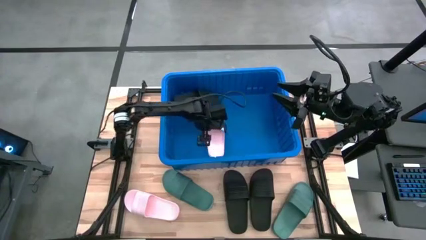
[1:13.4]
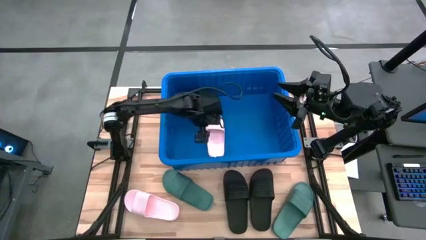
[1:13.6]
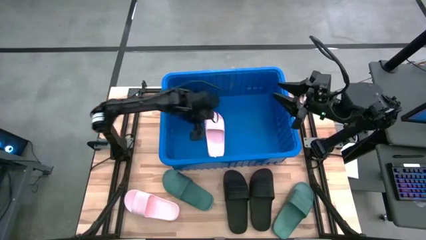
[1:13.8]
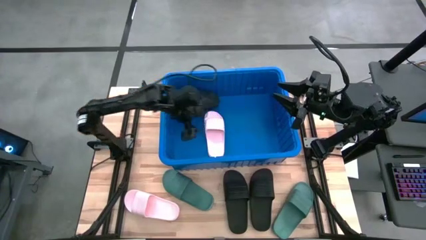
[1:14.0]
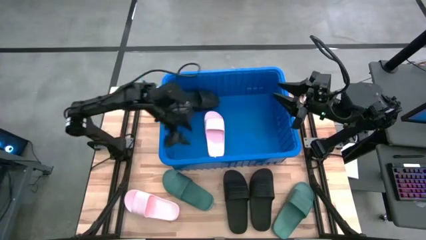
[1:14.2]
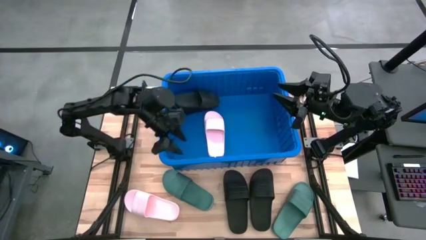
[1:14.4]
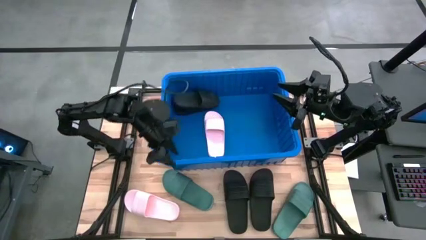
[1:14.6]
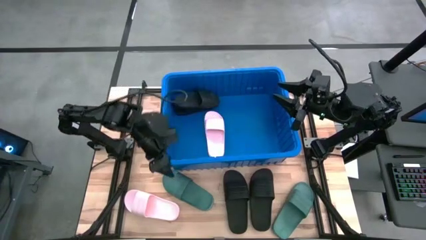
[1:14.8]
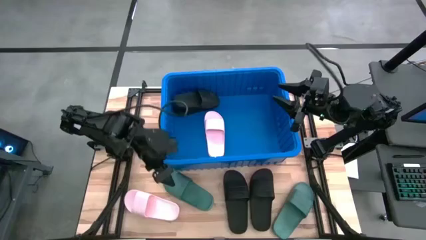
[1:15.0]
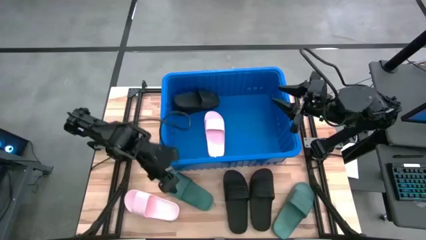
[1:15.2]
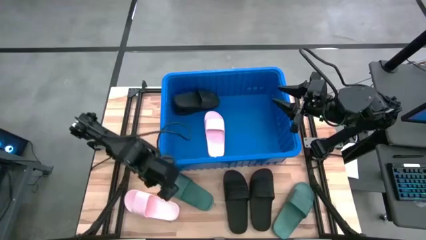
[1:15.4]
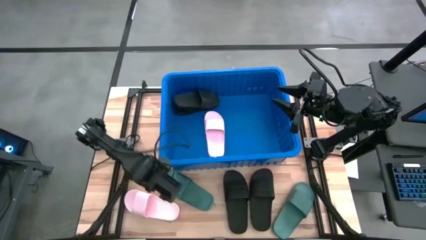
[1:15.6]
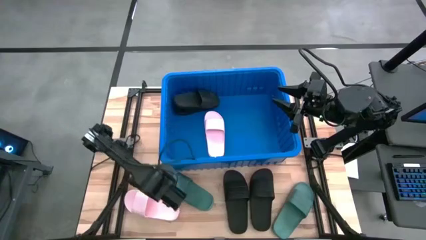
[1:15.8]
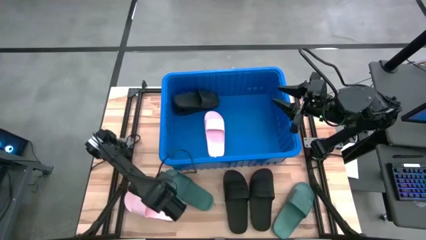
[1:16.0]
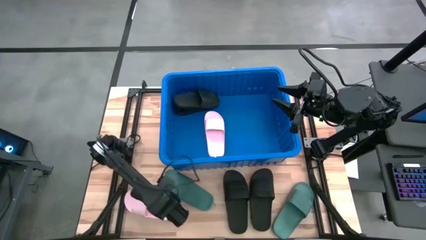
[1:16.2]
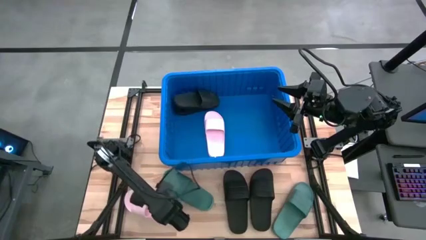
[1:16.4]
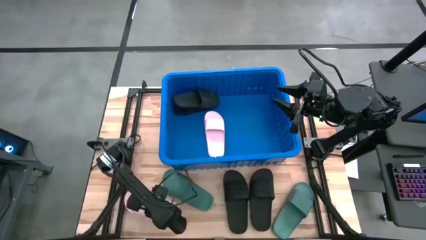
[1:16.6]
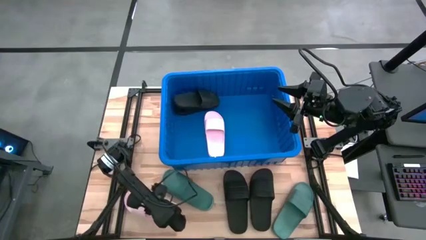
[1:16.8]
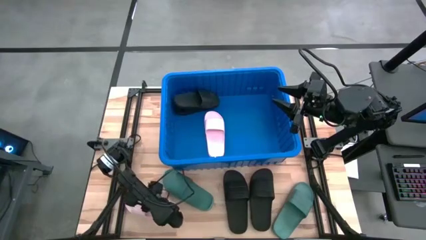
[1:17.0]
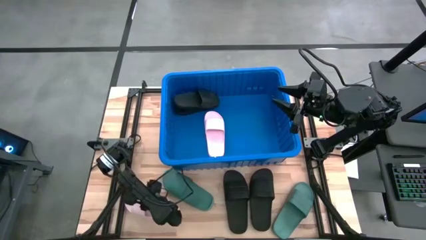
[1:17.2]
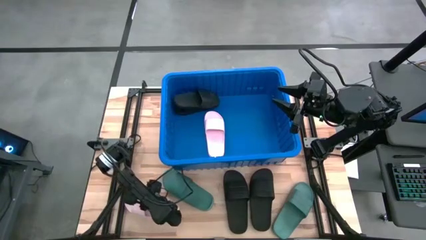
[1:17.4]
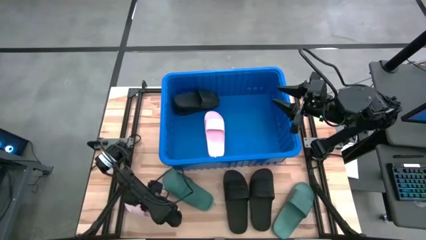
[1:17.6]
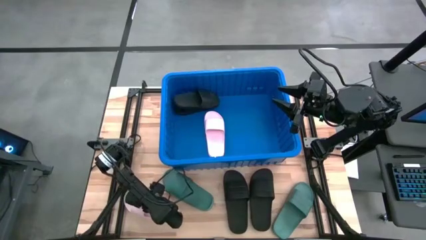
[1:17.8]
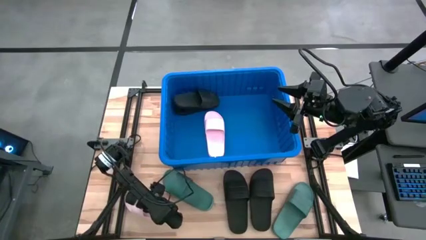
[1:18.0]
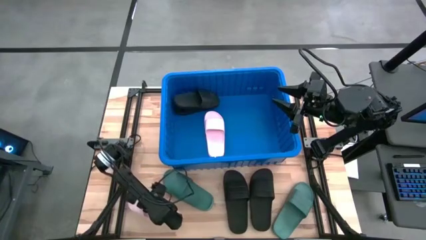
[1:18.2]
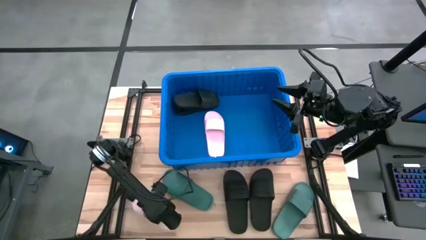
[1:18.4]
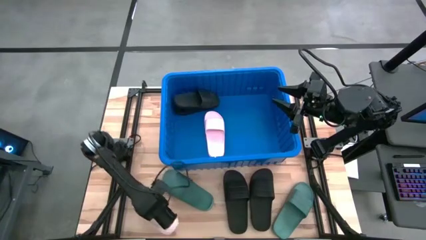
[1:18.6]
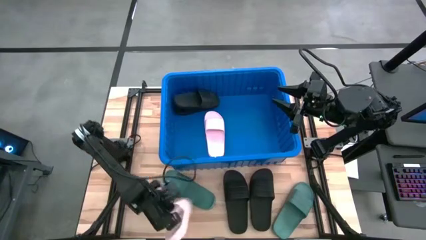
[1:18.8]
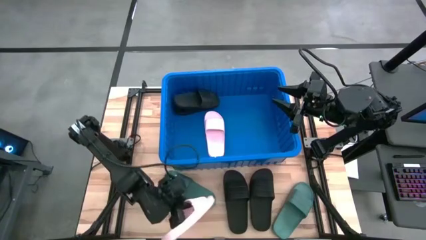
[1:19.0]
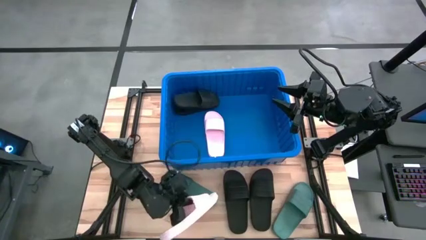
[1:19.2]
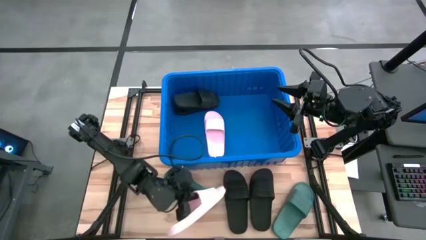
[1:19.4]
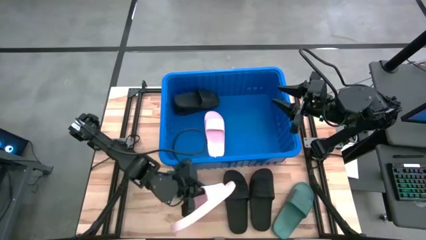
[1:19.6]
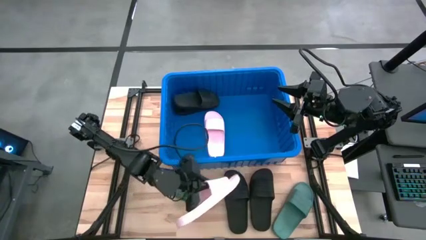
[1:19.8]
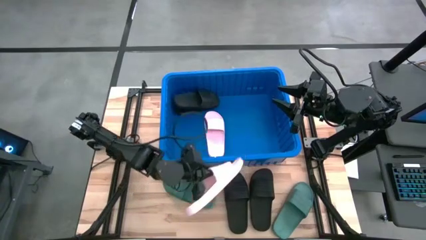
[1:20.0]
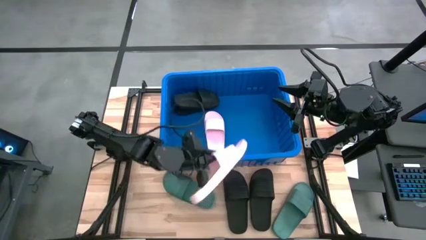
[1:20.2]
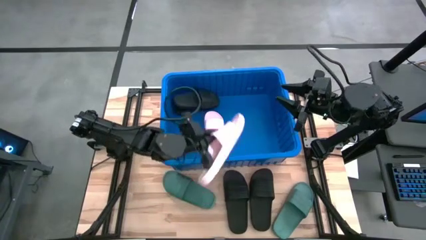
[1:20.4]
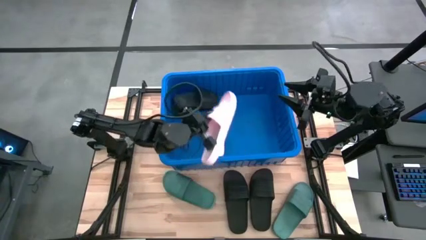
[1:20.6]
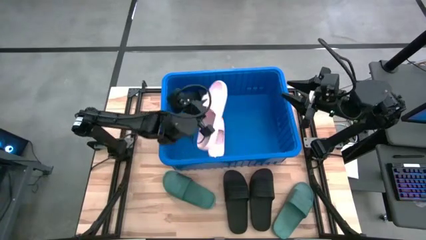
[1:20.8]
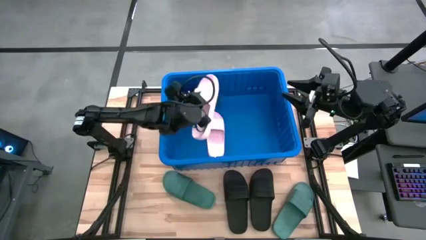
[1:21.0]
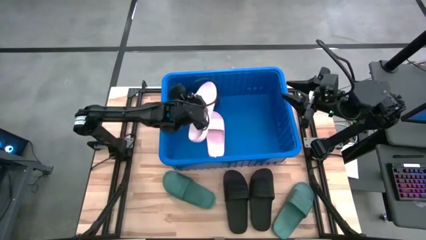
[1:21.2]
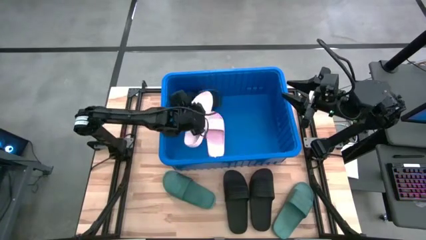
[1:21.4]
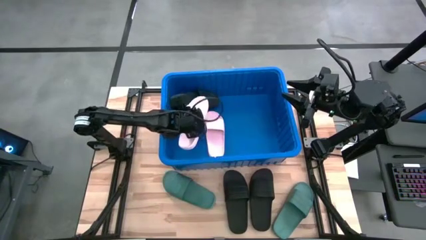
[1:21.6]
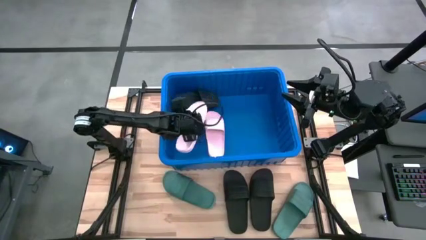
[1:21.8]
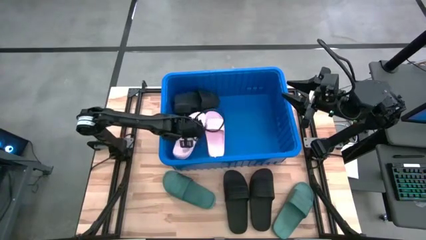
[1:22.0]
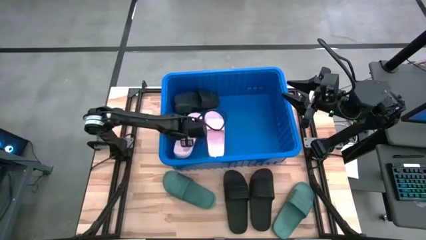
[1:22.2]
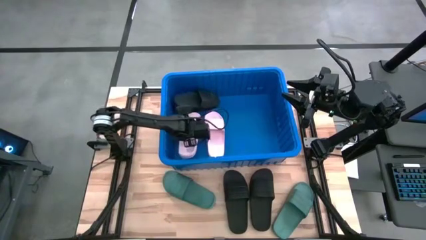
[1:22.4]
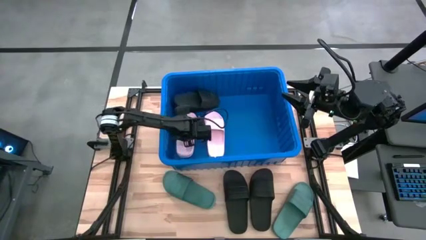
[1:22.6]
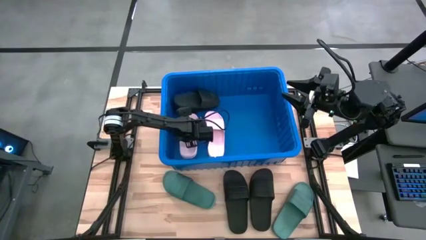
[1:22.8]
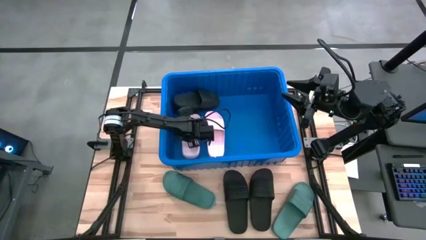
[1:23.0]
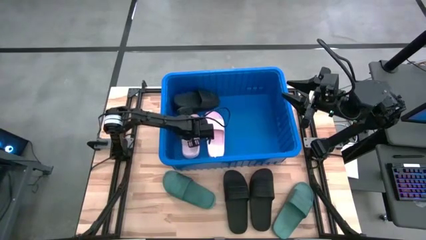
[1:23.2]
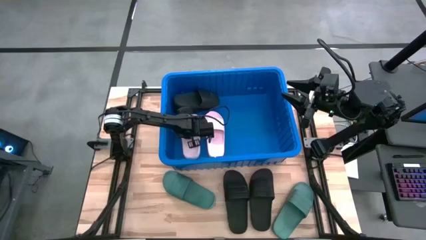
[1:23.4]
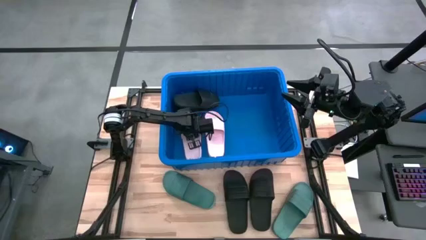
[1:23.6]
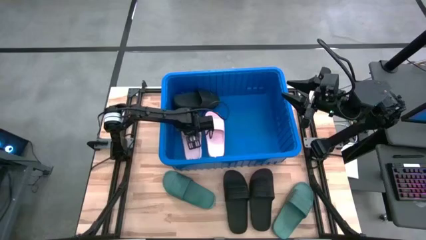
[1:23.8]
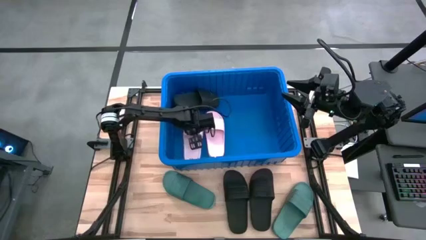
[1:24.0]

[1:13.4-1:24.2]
Task: Pick and place slides into bin
Put the pink slide into the blue container

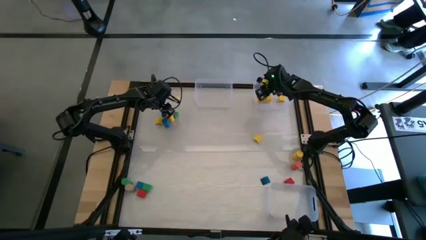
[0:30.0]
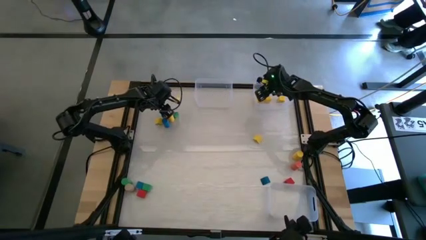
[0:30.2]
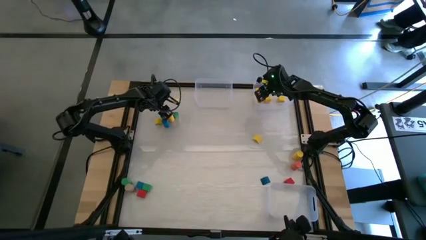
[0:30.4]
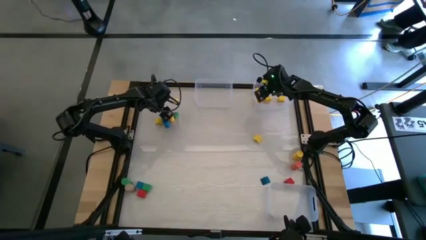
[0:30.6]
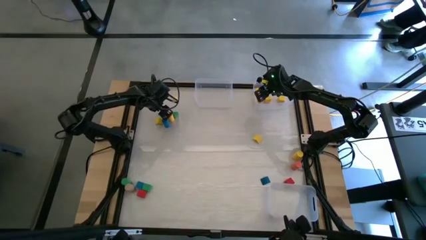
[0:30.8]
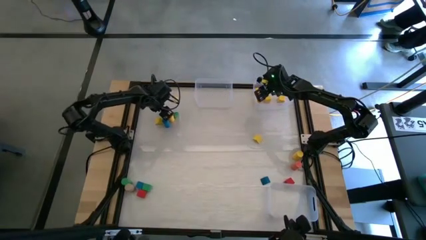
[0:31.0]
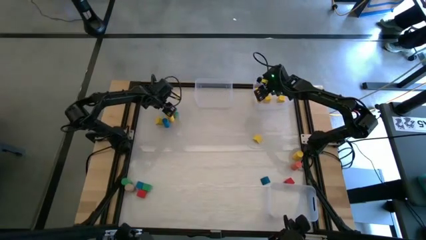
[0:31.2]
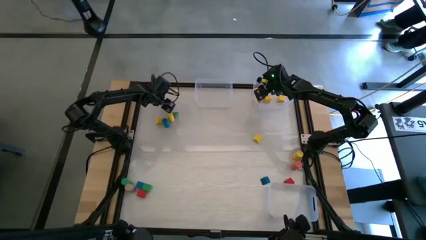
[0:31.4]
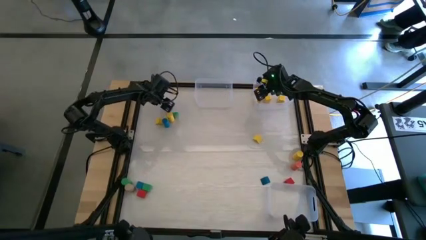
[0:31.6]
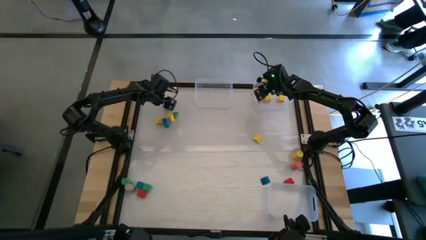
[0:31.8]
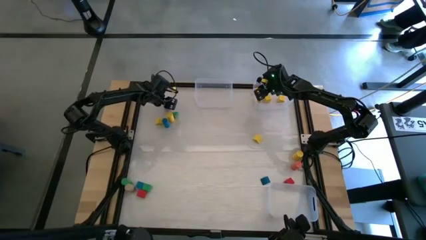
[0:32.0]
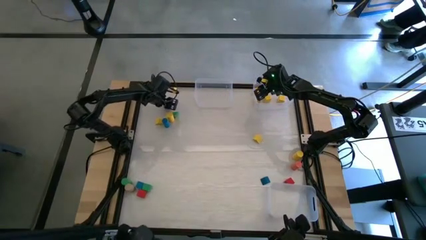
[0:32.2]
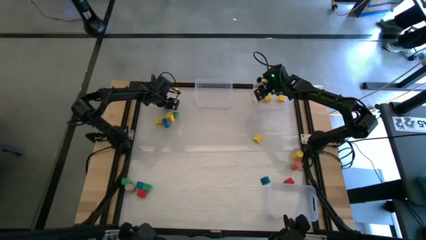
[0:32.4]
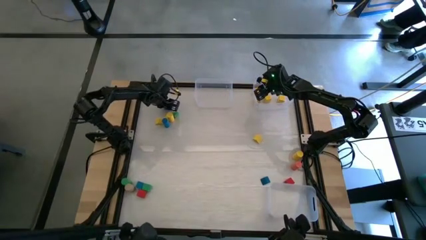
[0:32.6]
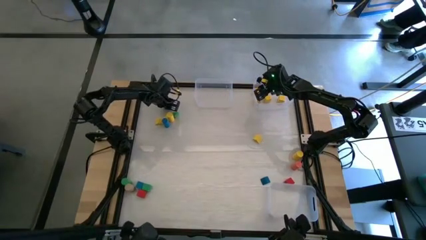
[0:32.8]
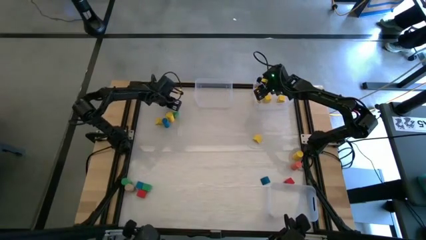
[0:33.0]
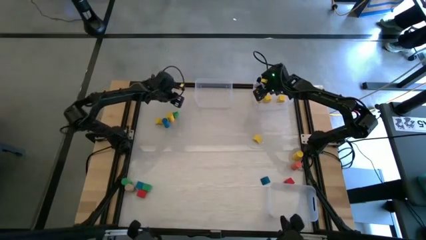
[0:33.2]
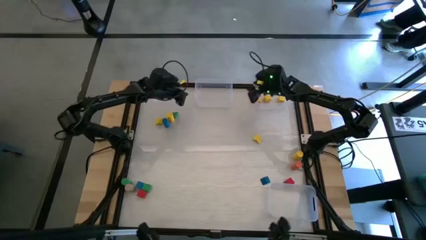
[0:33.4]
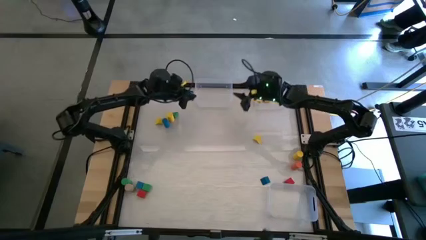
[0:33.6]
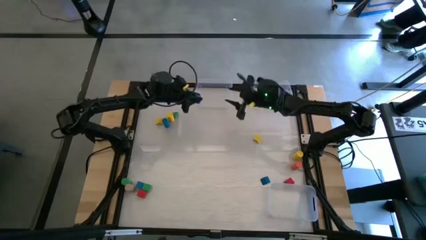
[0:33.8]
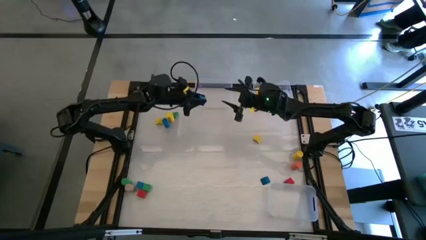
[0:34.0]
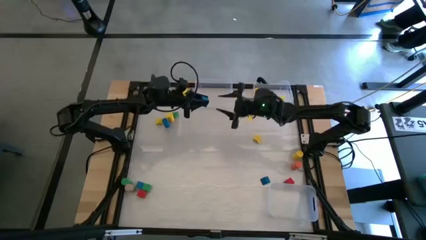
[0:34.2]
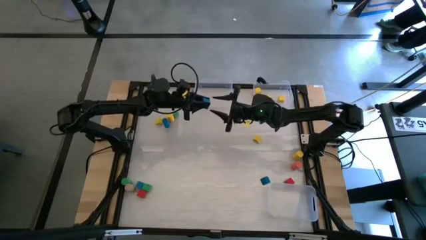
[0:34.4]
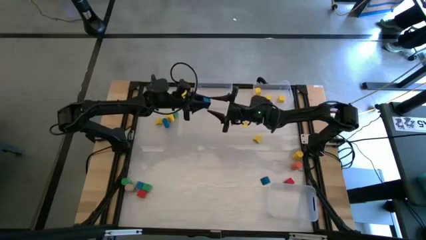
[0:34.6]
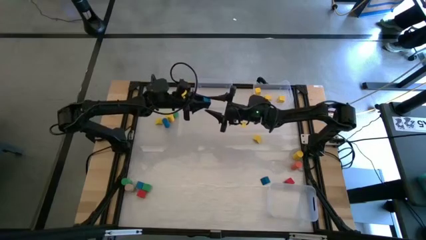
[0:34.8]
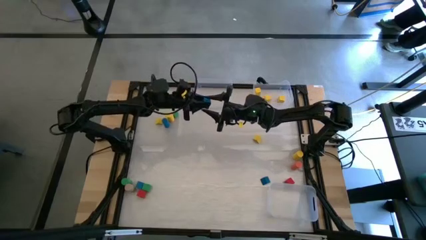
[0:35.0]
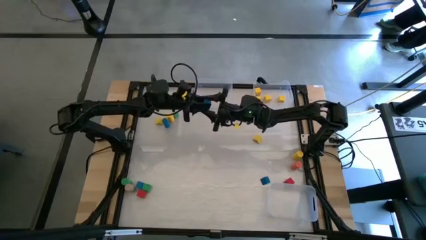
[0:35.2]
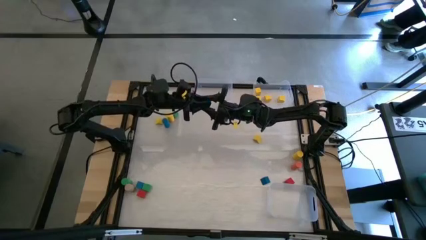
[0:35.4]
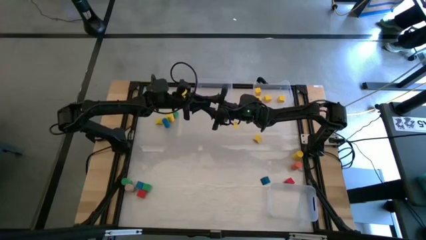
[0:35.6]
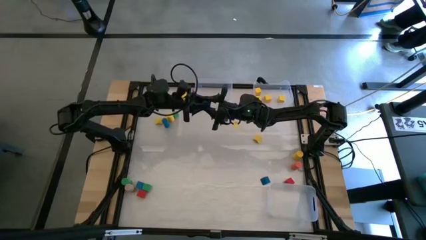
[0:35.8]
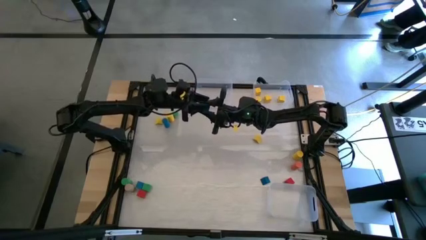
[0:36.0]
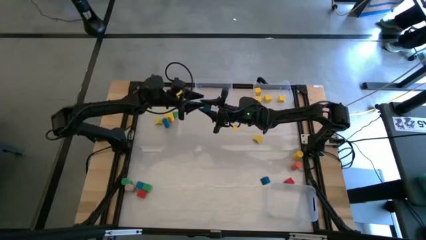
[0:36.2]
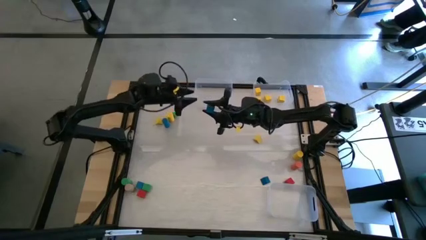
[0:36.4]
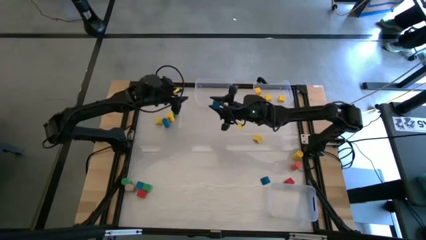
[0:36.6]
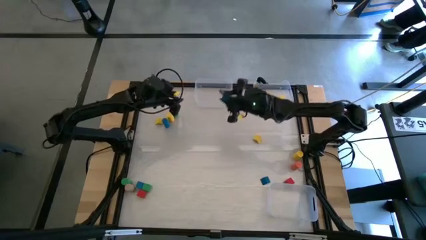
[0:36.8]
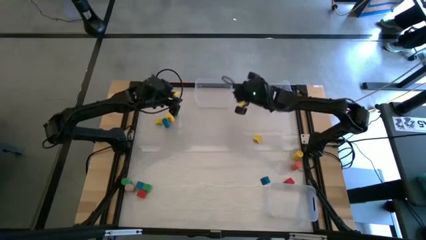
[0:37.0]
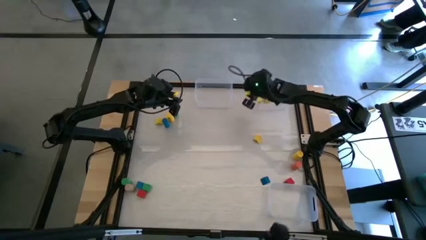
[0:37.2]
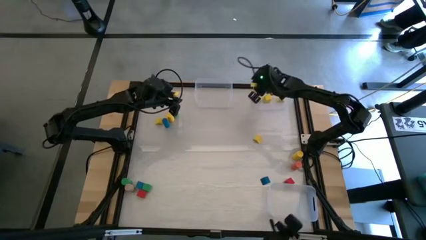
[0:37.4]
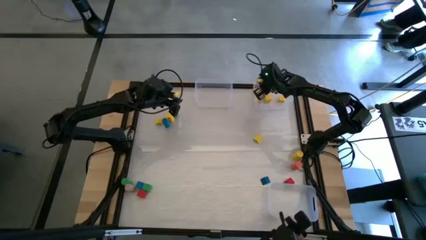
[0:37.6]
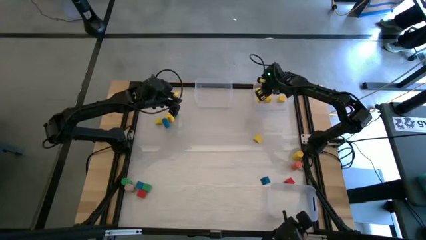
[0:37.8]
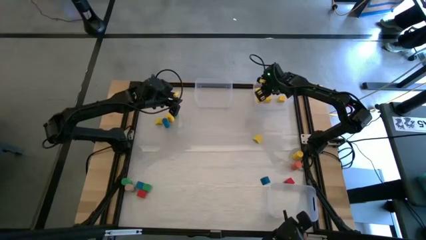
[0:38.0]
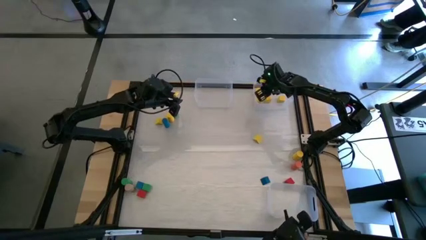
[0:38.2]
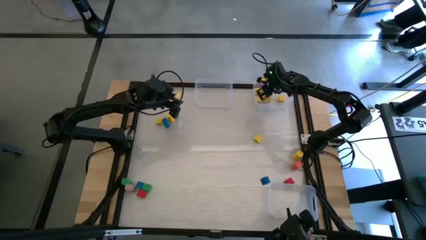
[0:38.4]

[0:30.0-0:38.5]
Task: Sort blocks by size
Put the blue square block into the top right transparent bin
